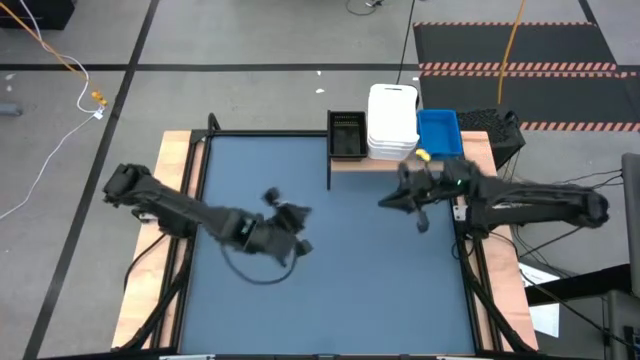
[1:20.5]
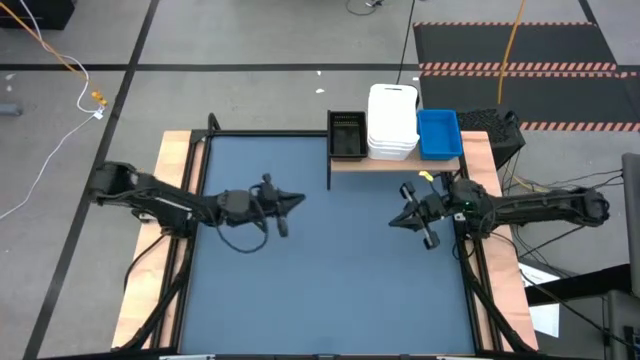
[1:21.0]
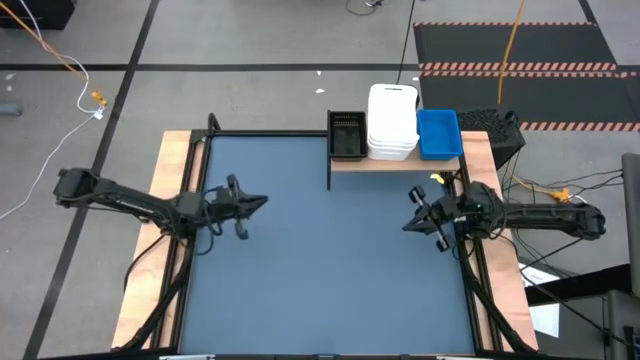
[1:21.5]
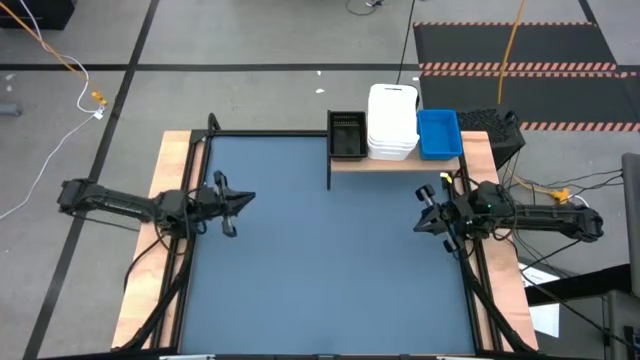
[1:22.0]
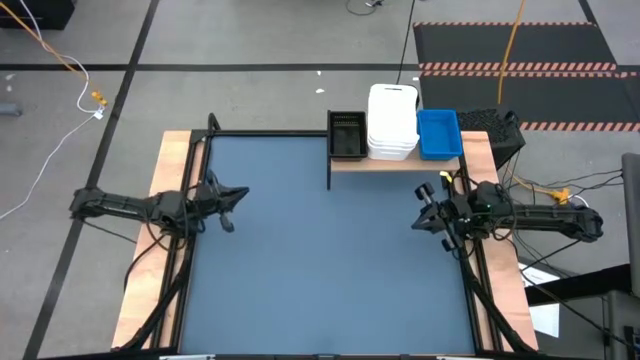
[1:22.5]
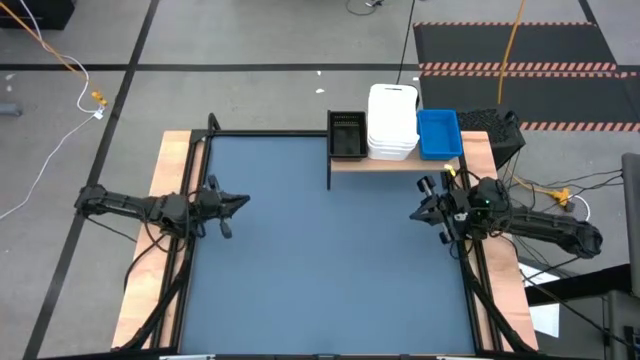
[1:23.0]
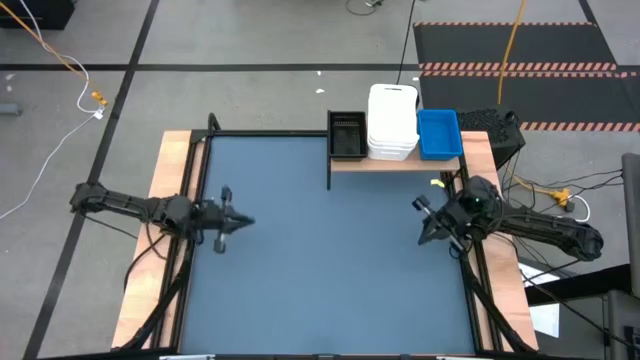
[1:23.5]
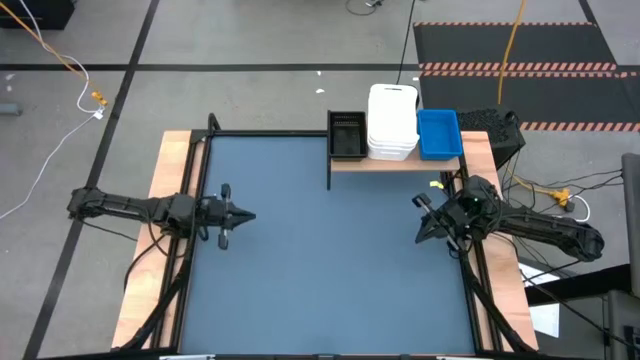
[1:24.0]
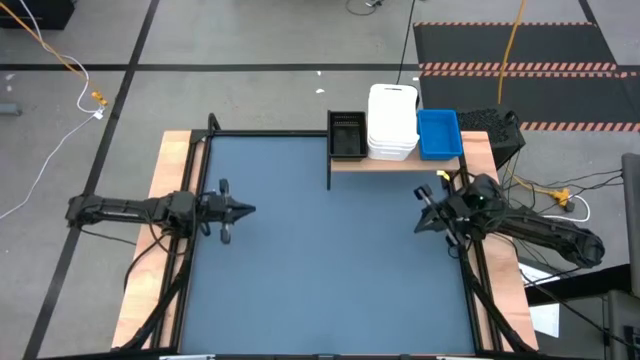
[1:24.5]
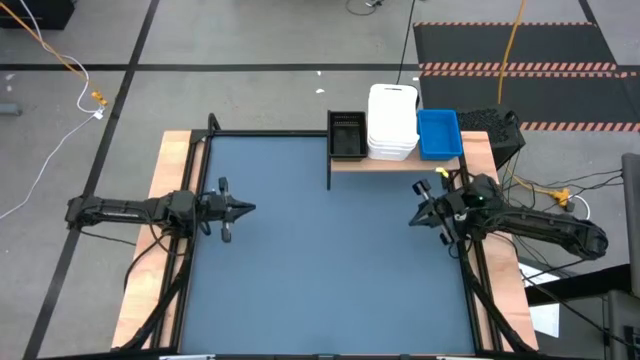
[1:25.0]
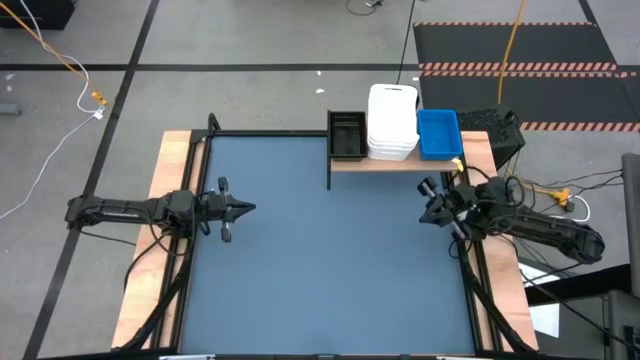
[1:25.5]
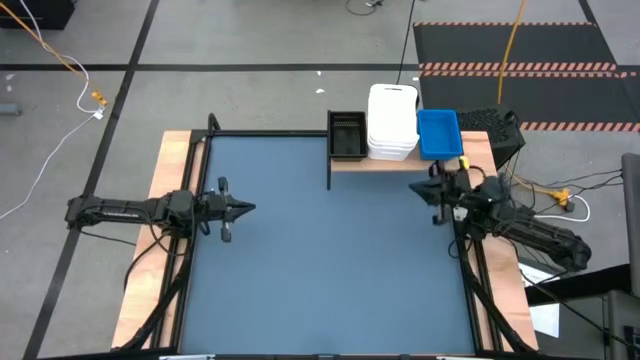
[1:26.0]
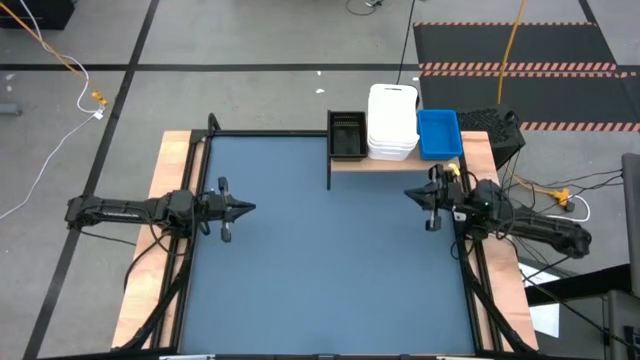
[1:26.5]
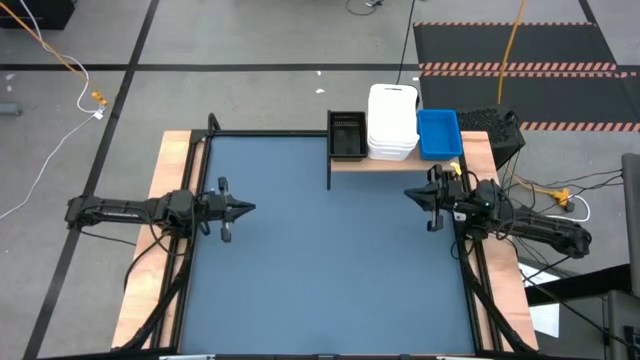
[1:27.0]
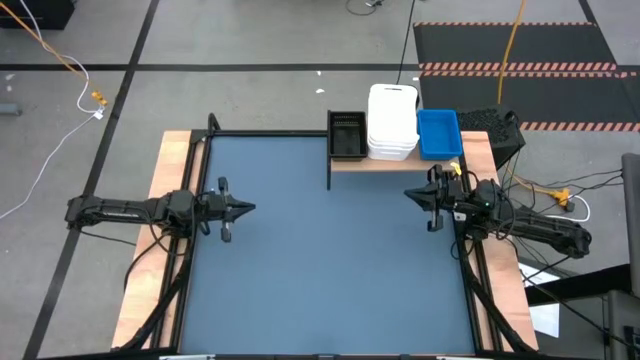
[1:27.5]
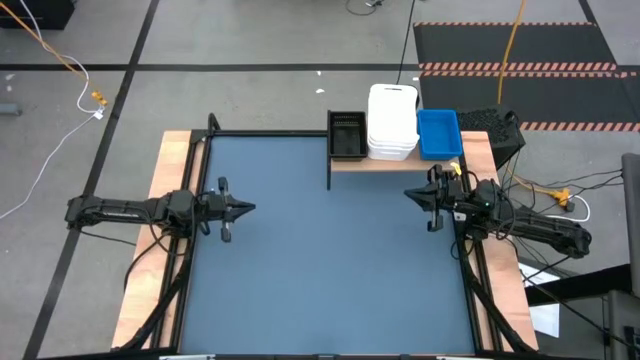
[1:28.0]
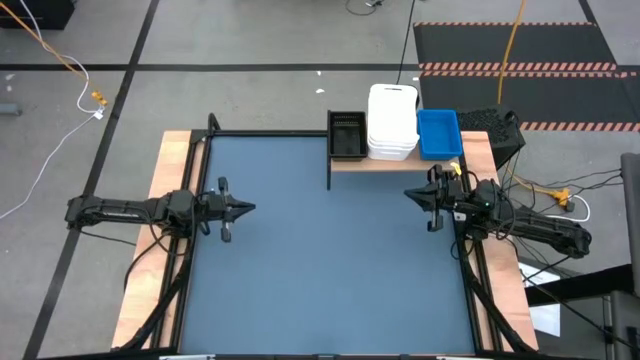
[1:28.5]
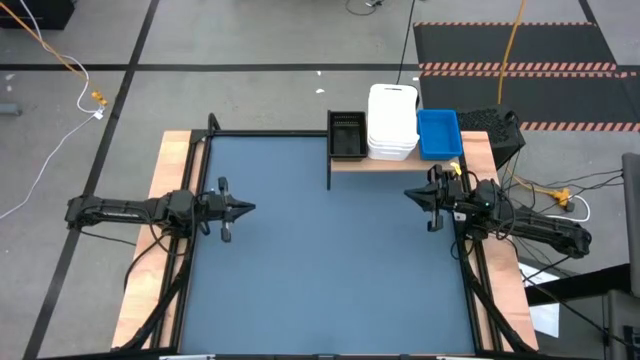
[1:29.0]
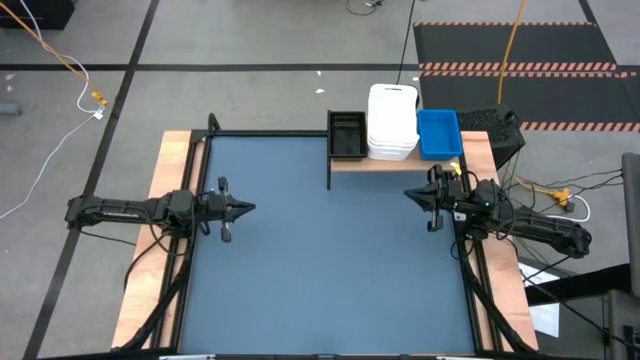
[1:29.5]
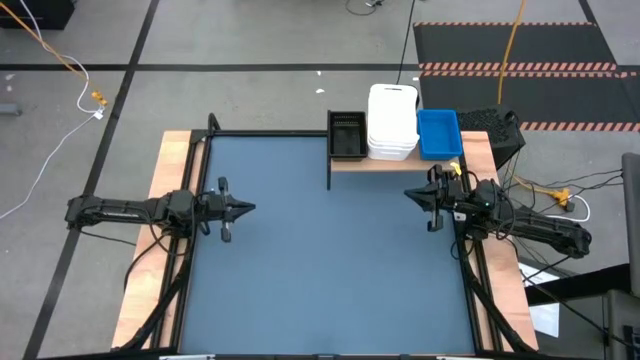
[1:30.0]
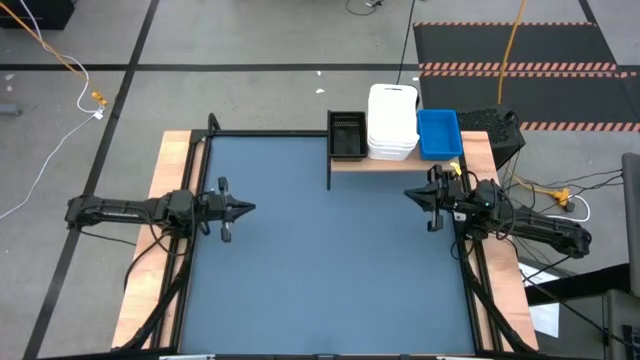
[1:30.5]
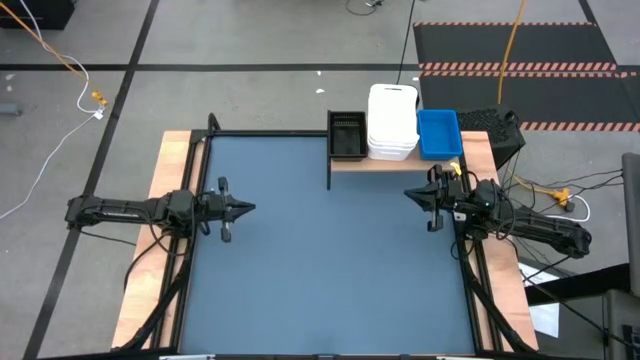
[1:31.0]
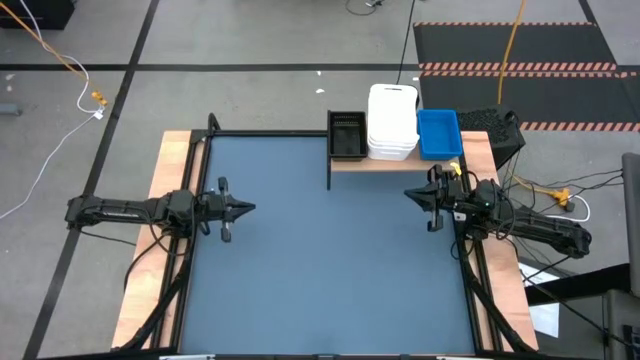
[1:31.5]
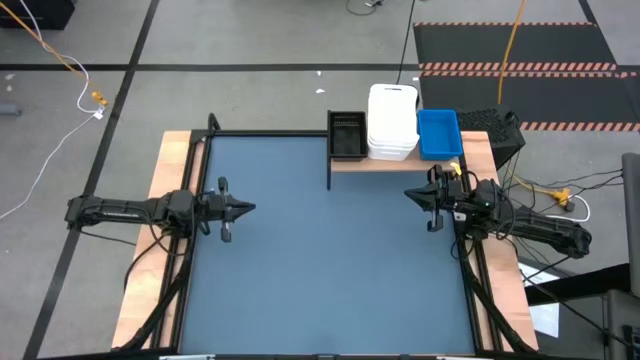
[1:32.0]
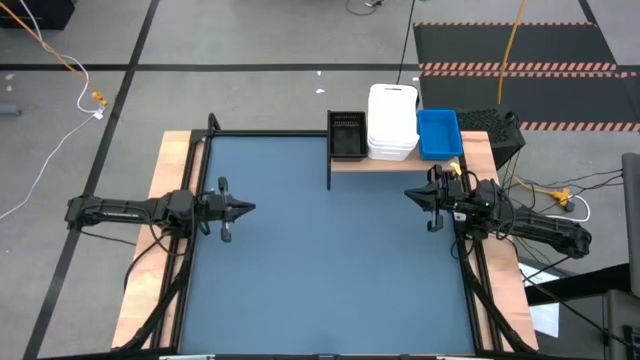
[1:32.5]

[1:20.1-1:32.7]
Task: Stack baskets on shelf by color
Return to Home Position

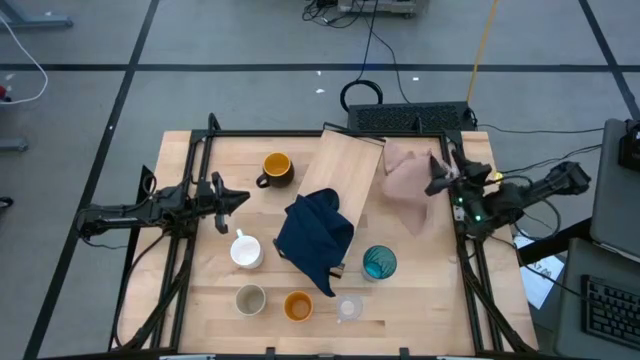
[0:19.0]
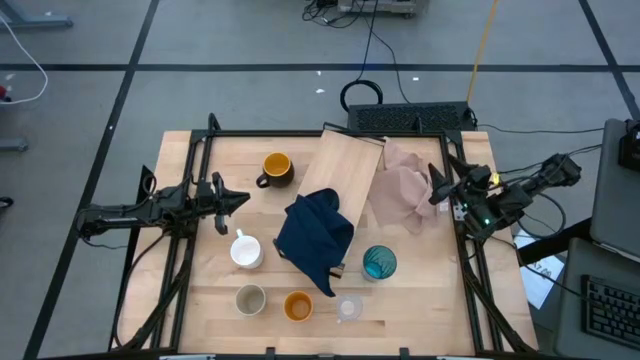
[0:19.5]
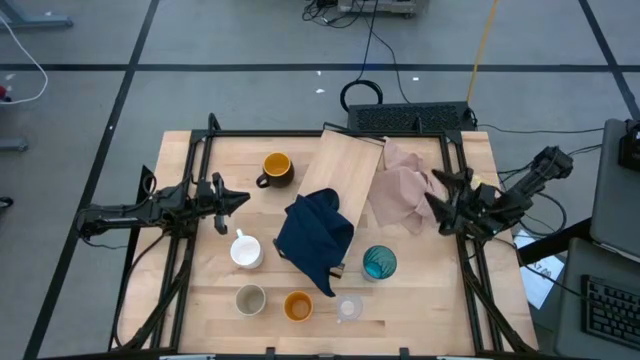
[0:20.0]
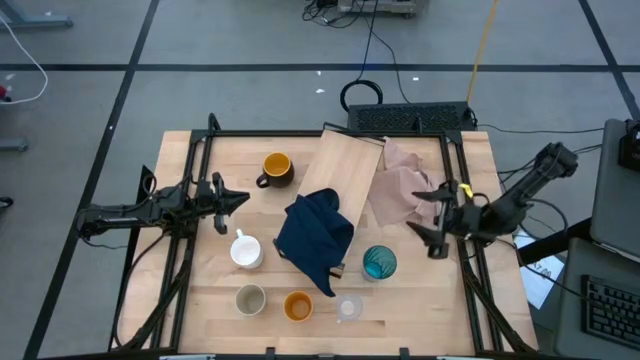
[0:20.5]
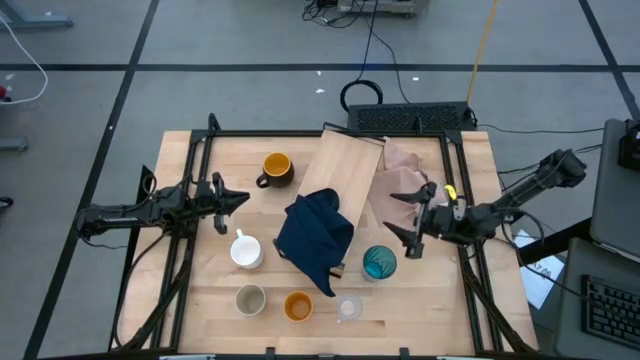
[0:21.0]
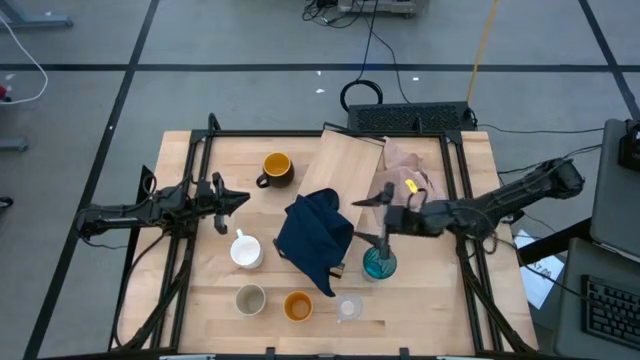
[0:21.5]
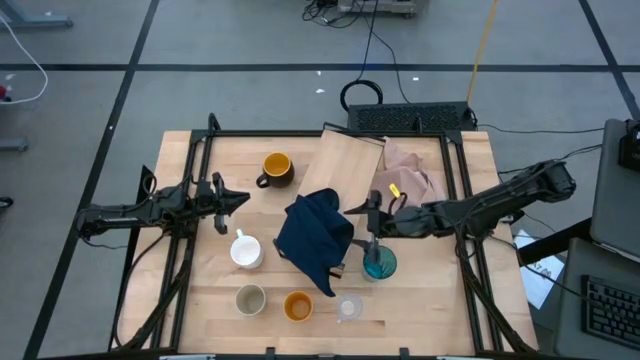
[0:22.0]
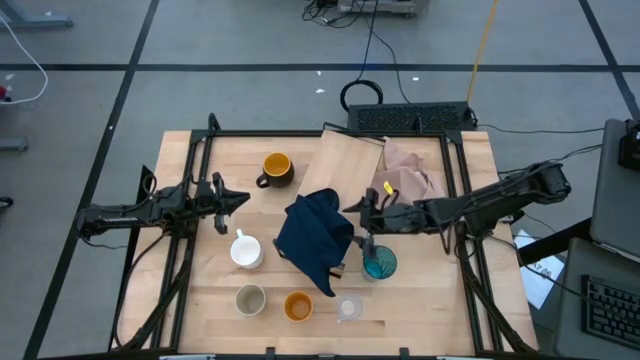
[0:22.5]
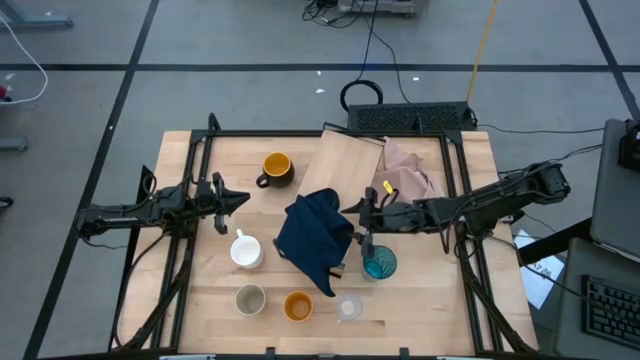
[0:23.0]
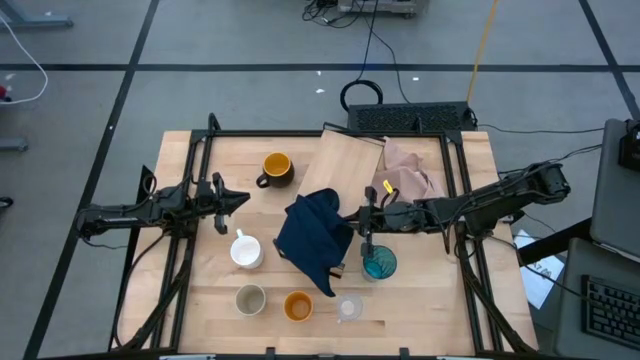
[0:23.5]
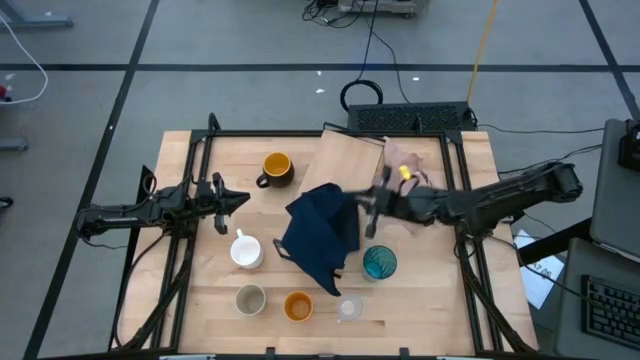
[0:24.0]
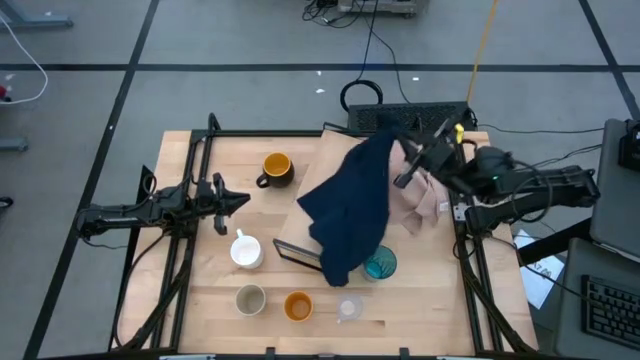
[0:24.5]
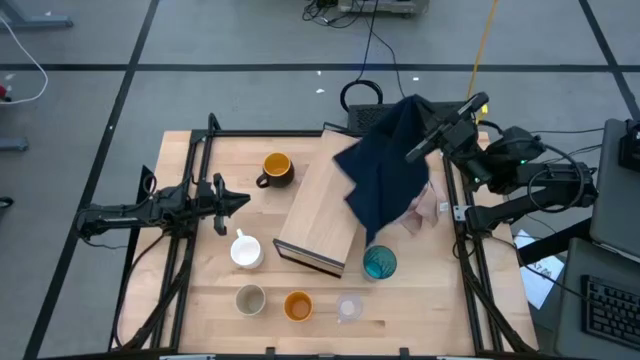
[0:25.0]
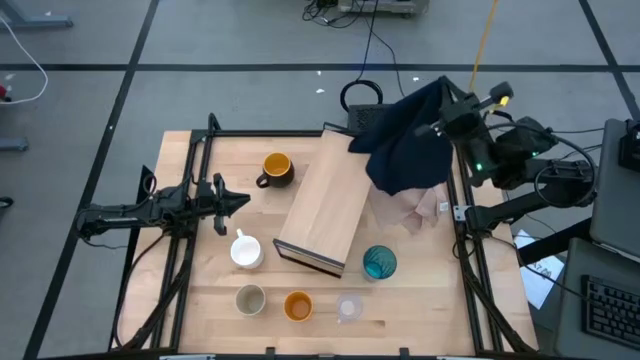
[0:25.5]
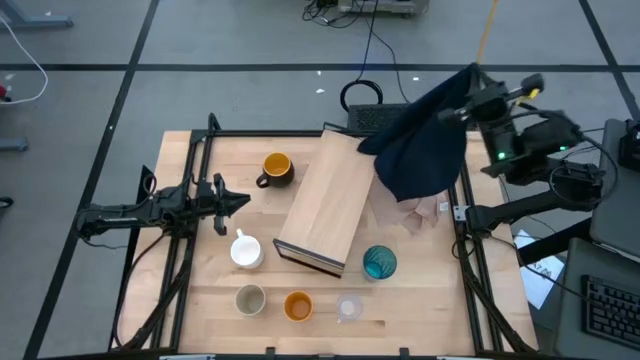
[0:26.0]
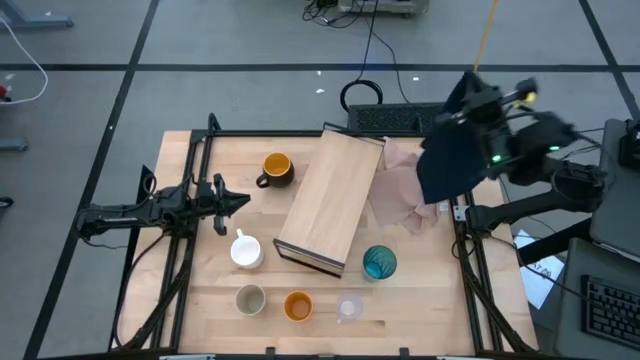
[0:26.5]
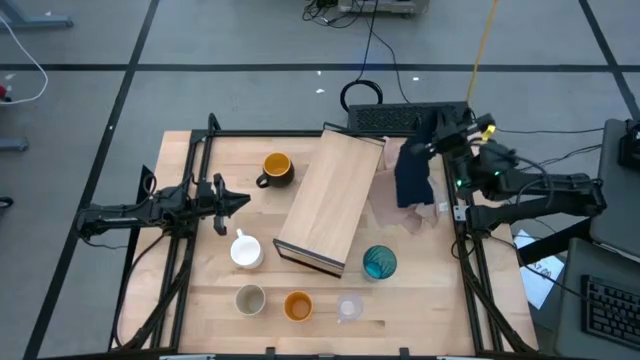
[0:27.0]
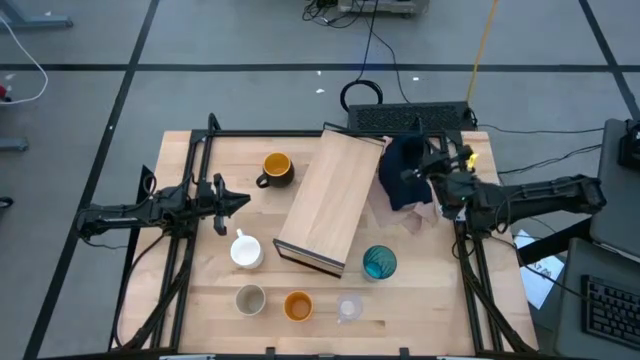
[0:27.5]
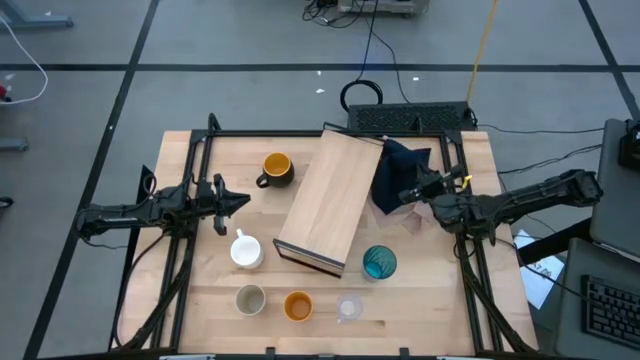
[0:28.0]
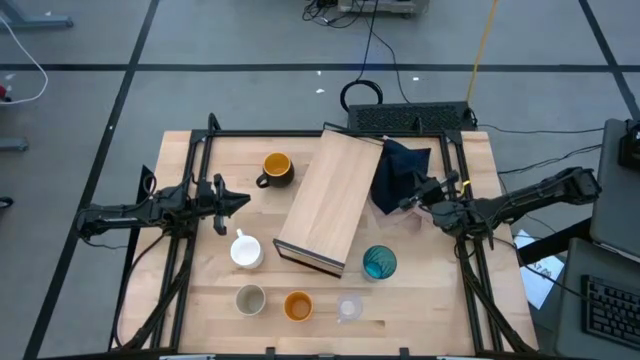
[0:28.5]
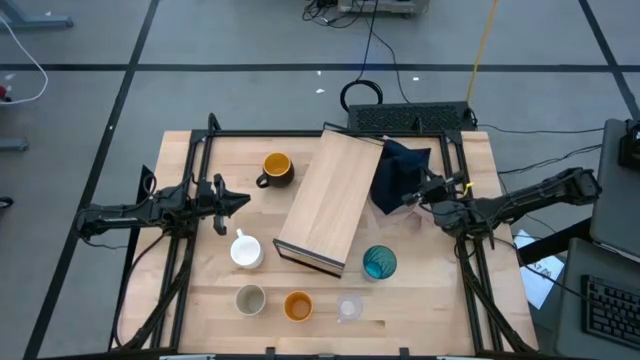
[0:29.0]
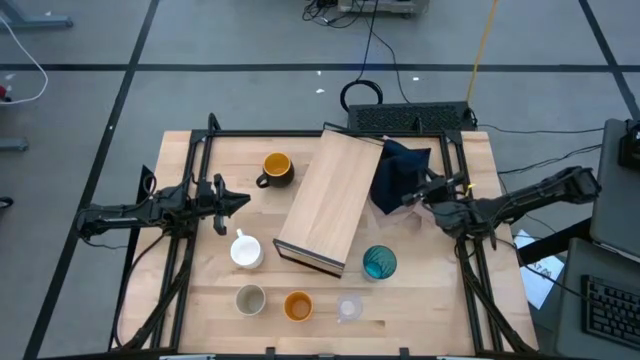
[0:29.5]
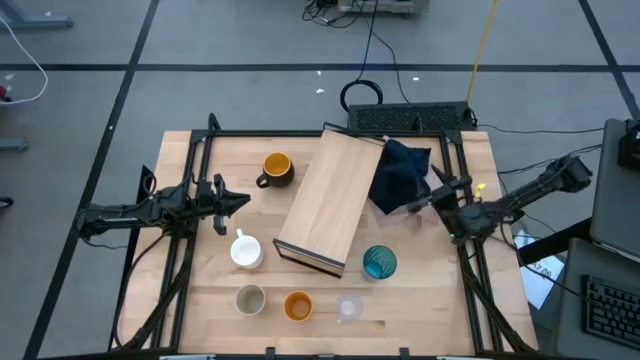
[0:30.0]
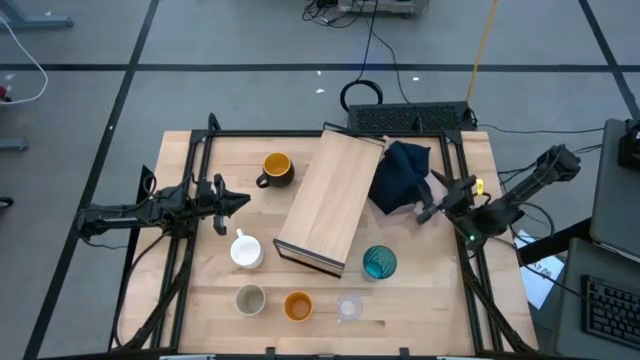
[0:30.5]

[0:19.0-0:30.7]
Task: Stack small to large cups/mugs on shelf
Remove the dark blue table napkin from the shelf
